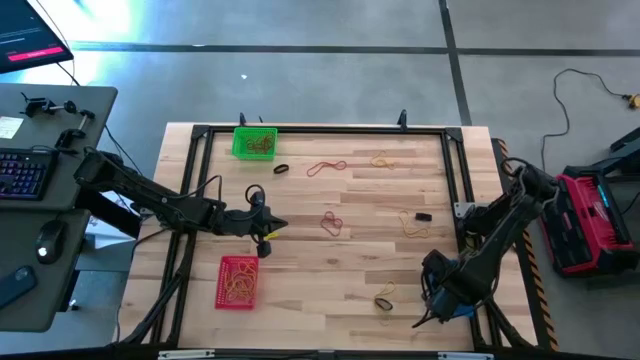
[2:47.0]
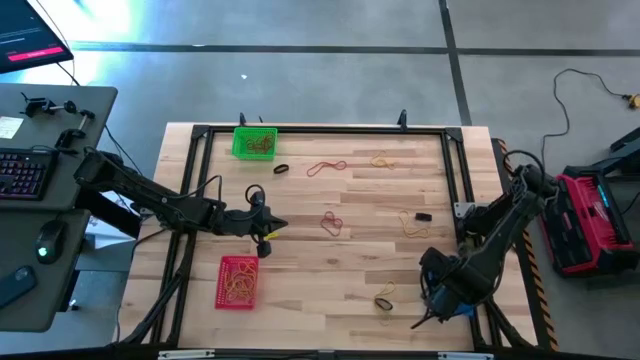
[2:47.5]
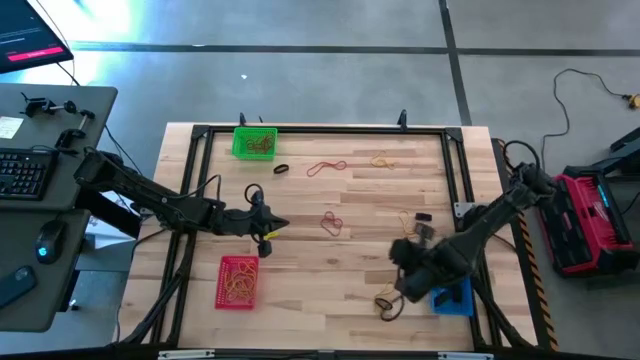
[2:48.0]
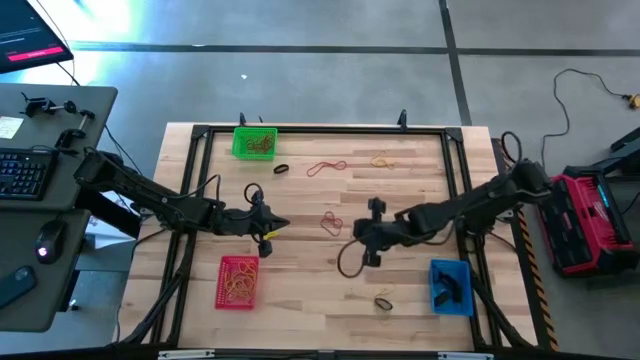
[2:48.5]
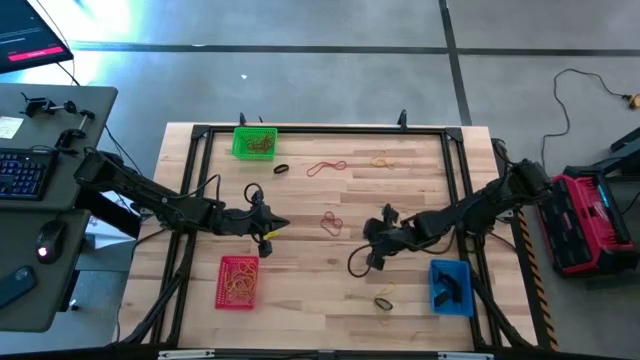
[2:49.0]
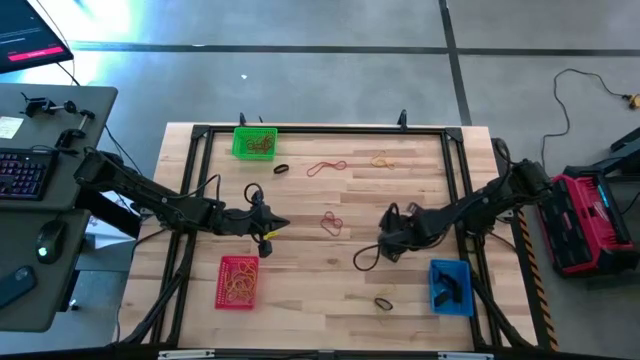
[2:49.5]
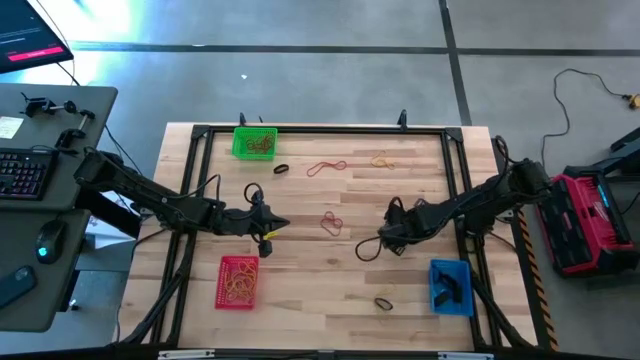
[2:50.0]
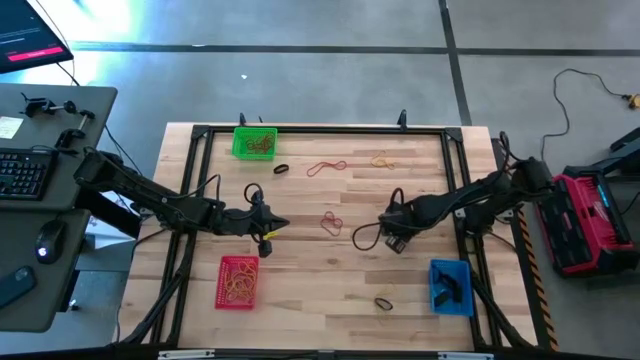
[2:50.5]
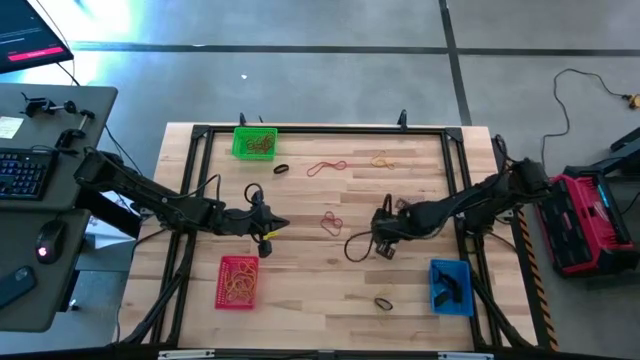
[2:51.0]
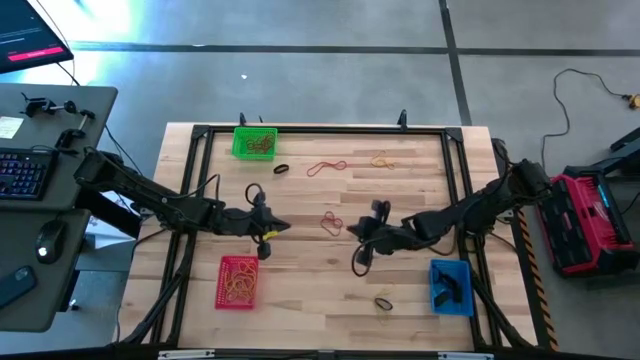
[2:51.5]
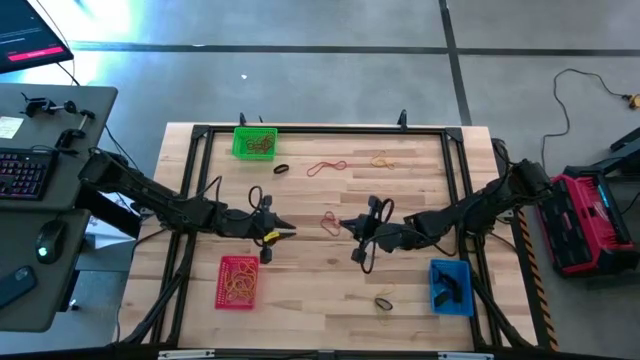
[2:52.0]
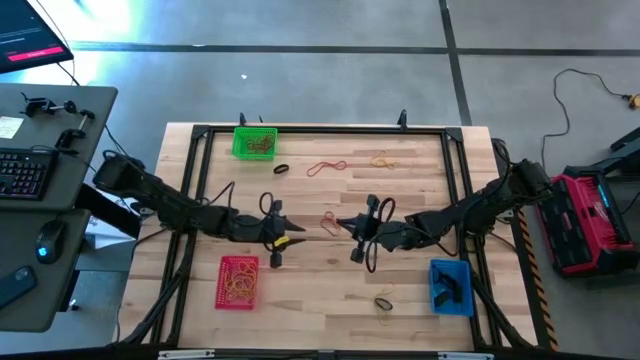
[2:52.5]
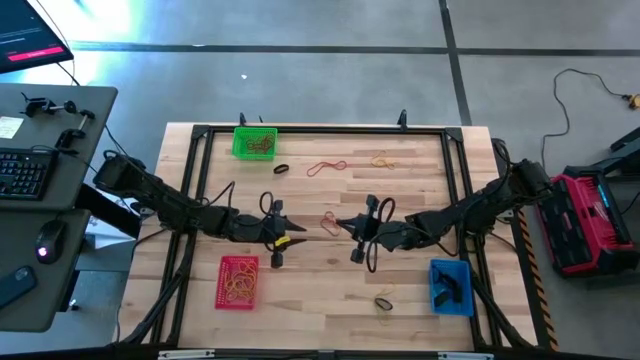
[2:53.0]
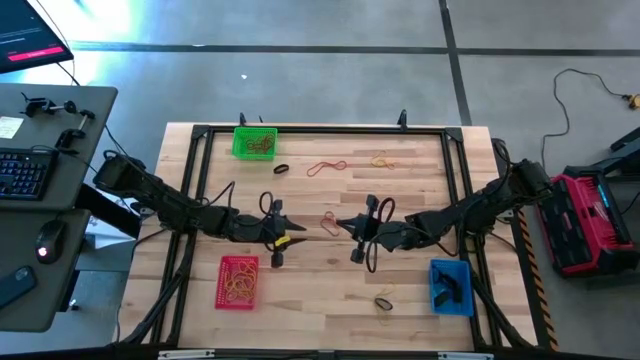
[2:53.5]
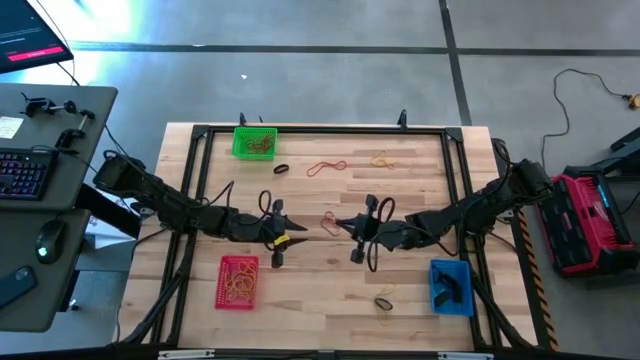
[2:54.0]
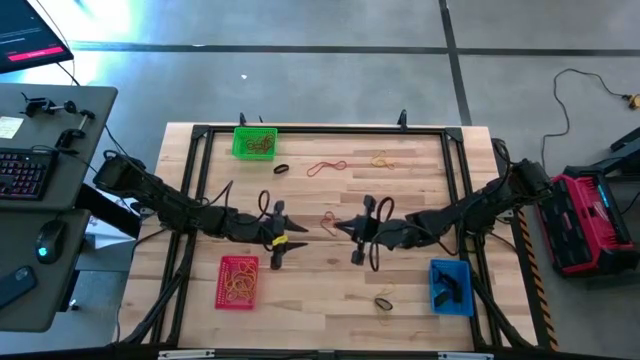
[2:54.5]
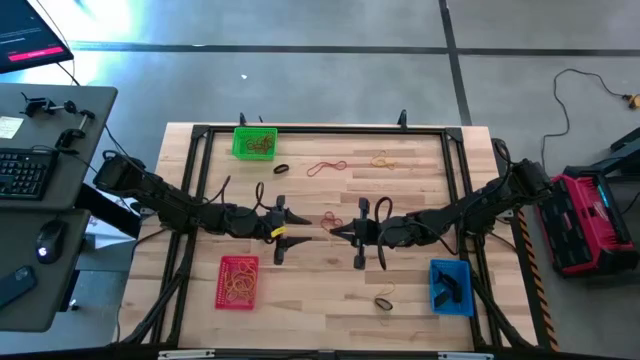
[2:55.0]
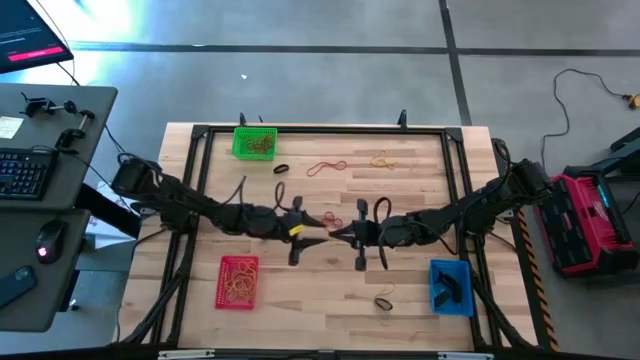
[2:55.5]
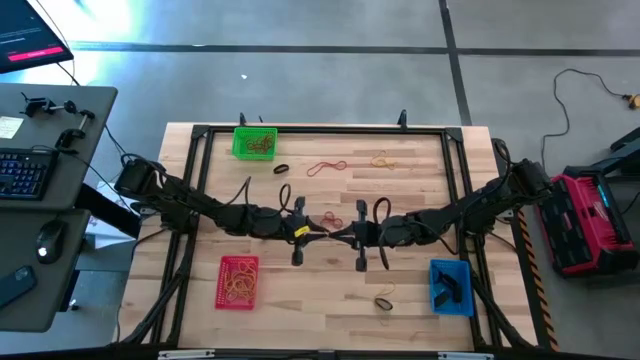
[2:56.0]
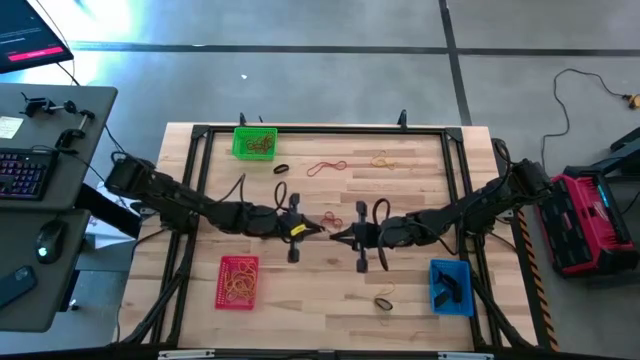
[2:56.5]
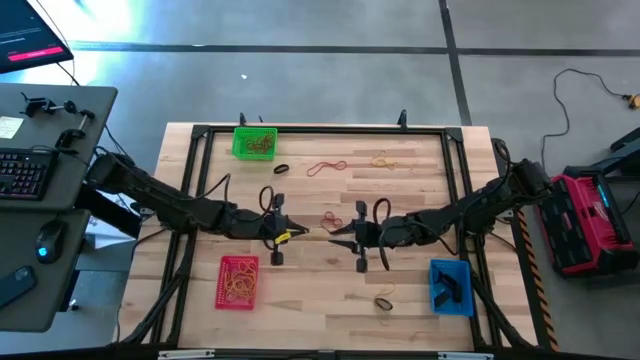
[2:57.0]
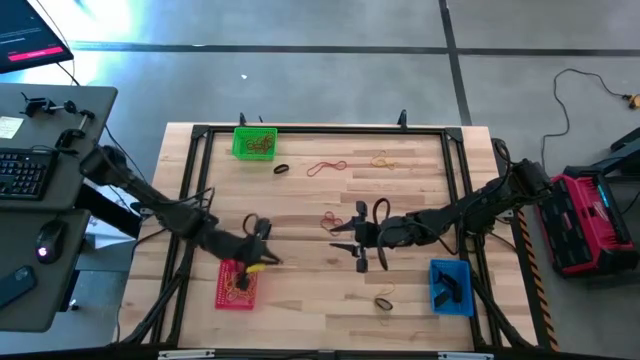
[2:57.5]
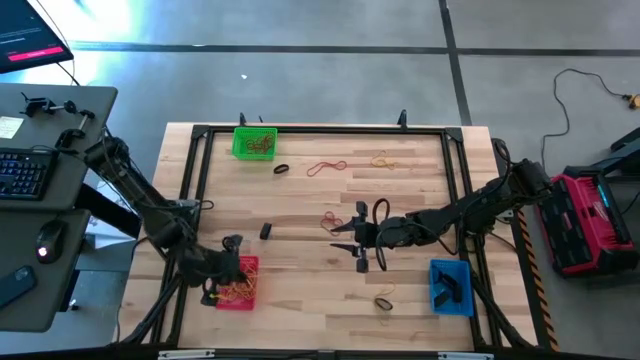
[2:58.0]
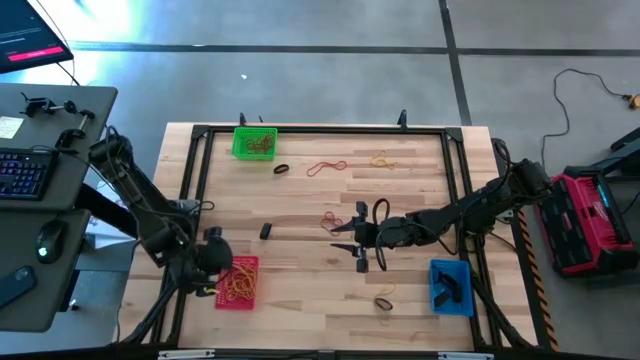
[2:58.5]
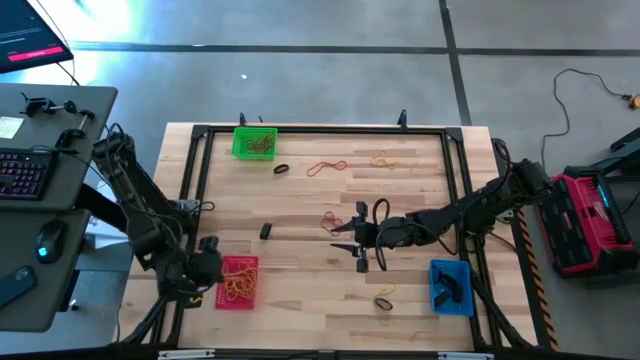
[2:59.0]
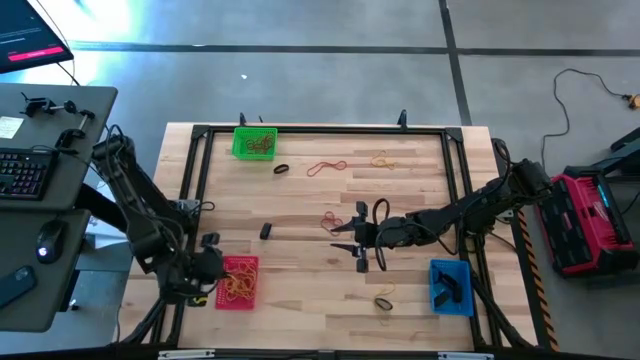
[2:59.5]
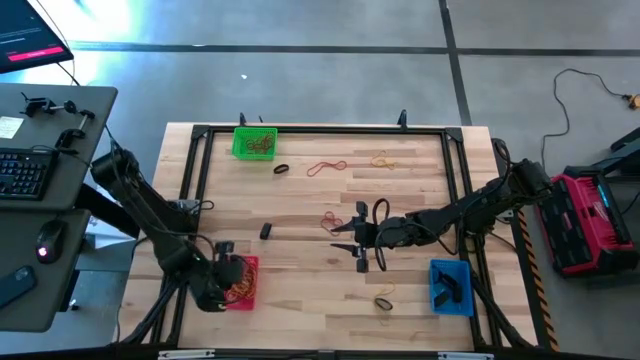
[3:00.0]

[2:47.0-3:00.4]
Task: Sort rubber bands into baskets
Put the yellow rubber band into the red bin

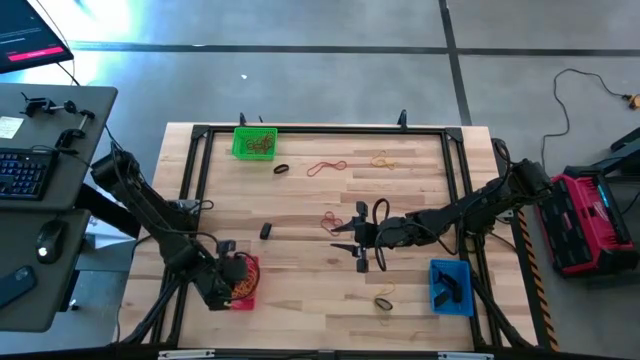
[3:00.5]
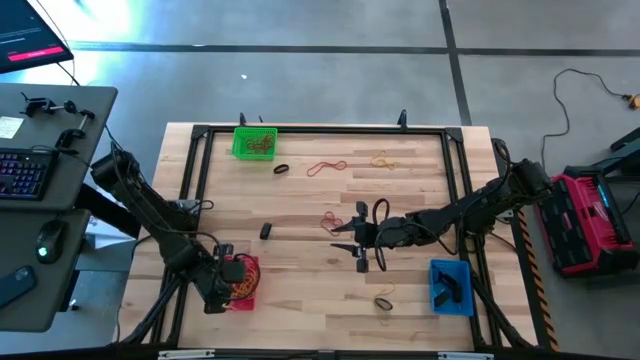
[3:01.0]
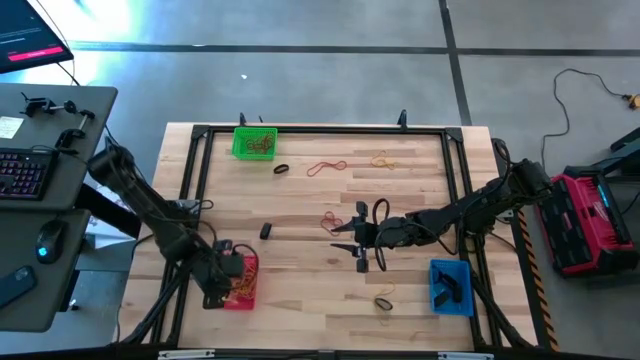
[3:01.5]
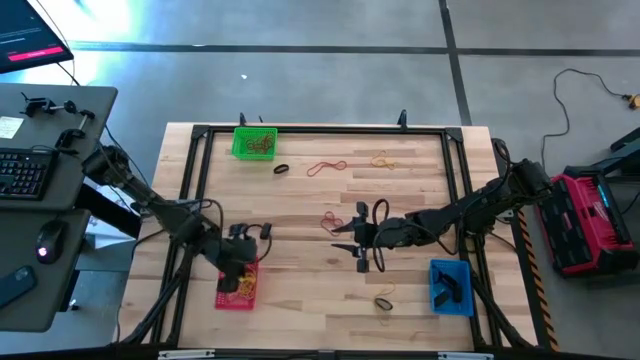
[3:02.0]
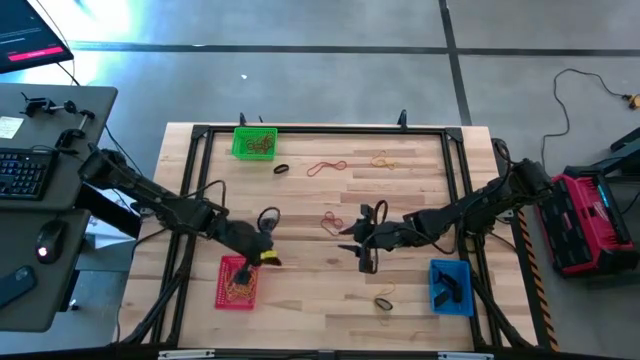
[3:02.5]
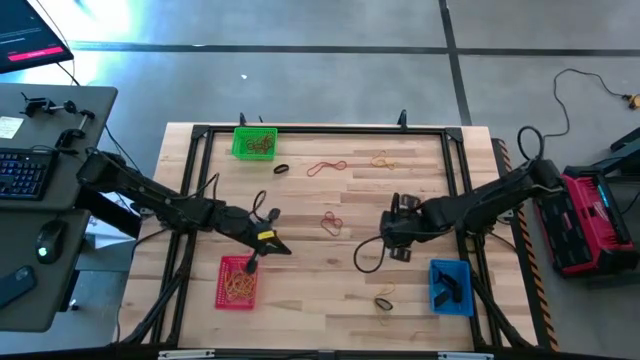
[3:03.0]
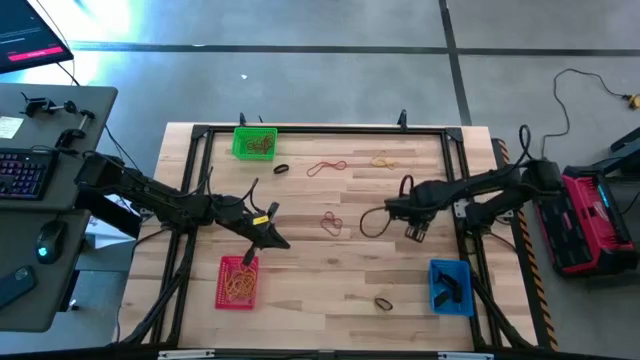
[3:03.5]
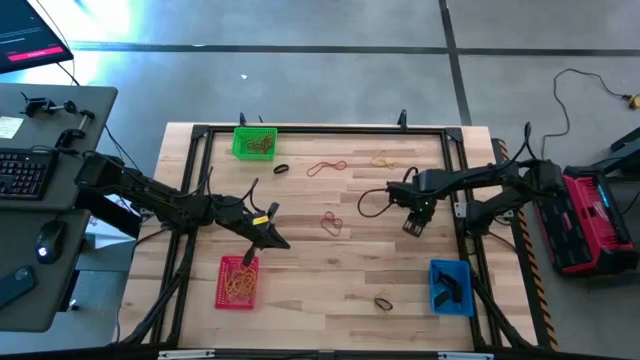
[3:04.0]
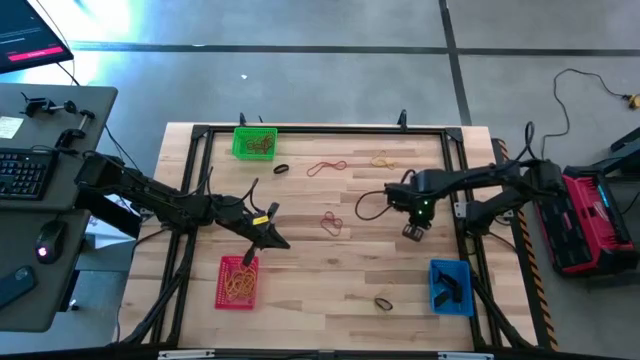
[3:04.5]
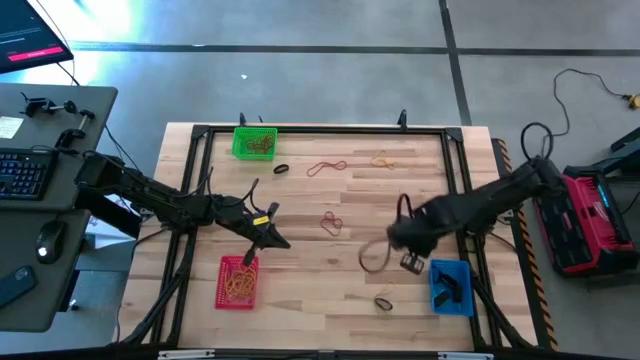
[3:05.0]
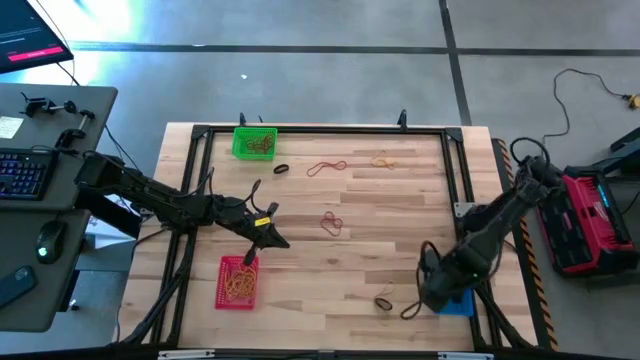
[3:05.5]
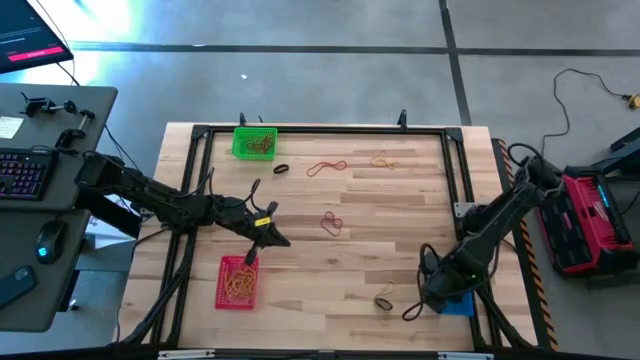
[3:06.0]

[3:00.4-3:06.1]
Put the black rubber band into the blue bin

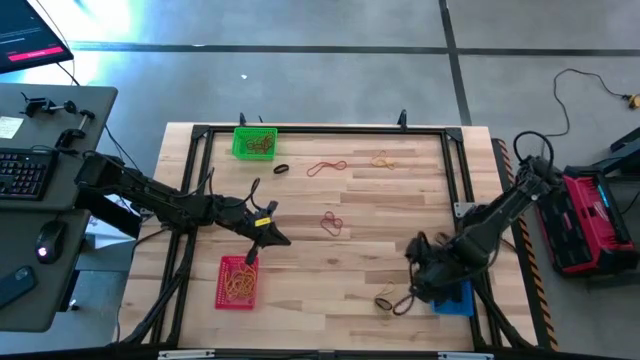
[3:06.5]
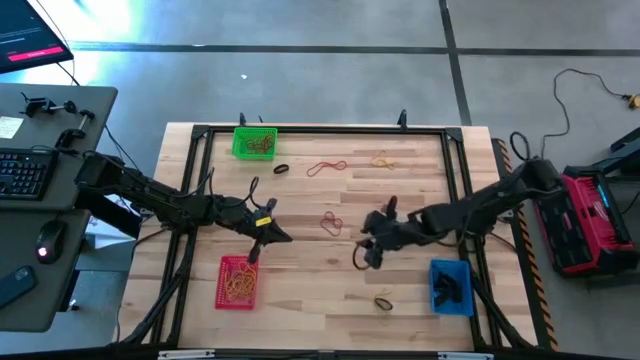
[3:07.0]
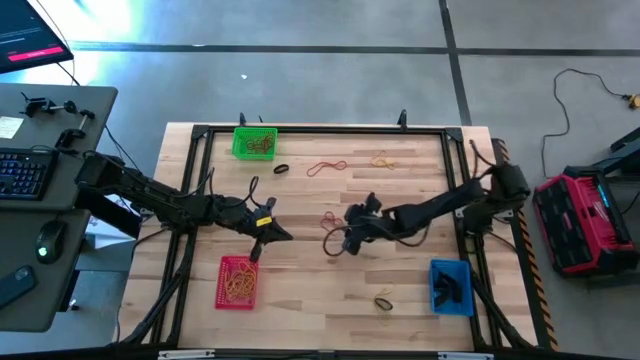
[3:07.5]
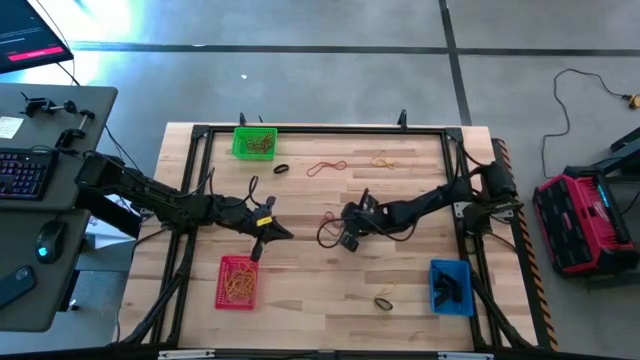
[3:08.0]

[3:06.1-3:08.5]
Put the red rubber band into the green bin
